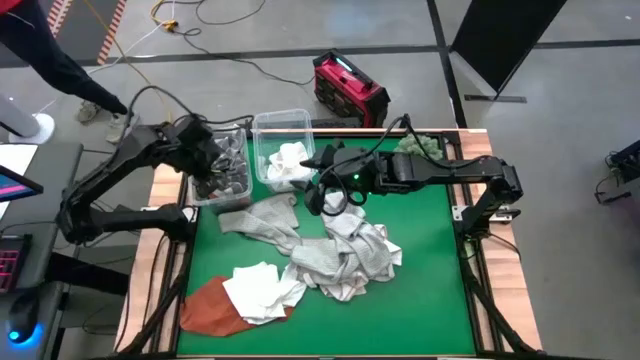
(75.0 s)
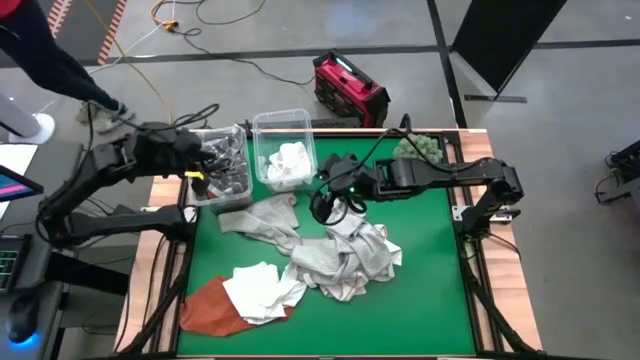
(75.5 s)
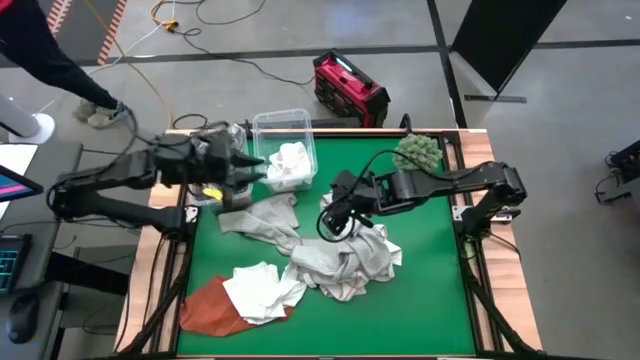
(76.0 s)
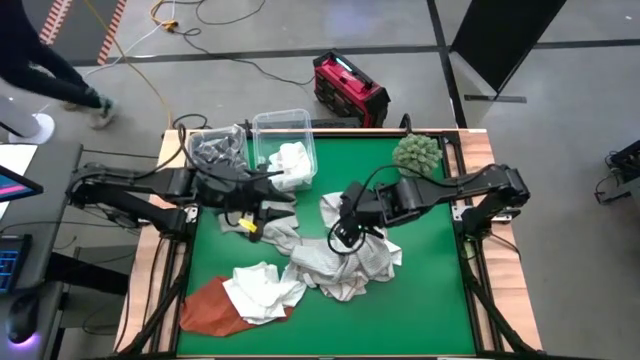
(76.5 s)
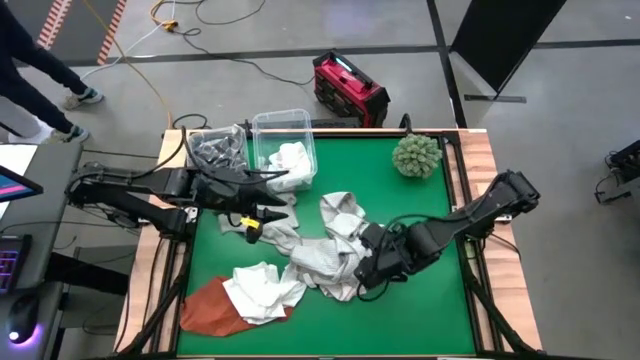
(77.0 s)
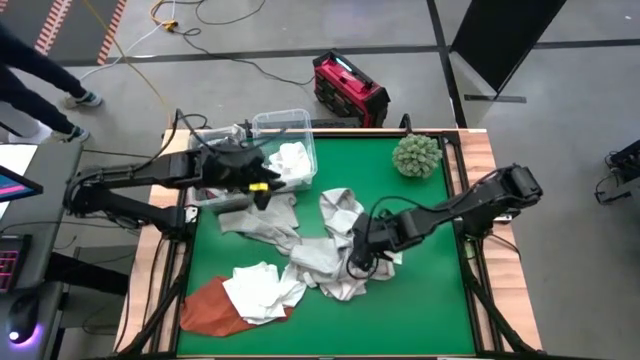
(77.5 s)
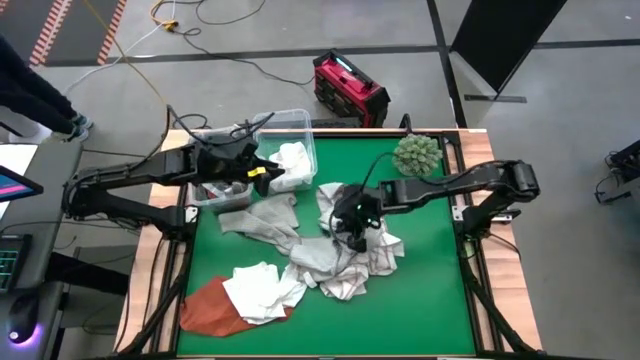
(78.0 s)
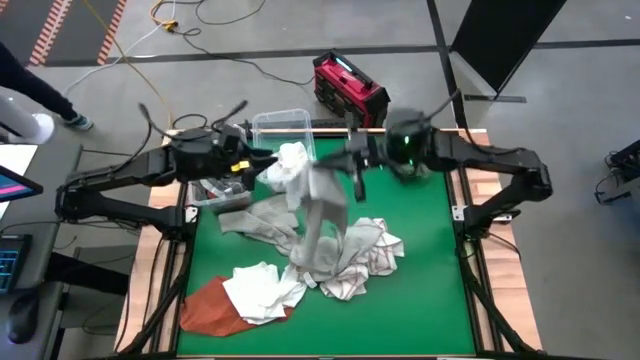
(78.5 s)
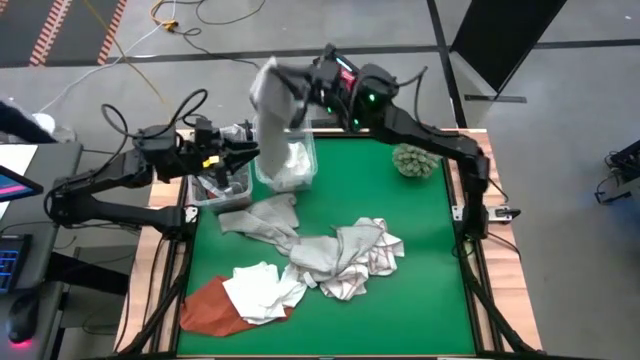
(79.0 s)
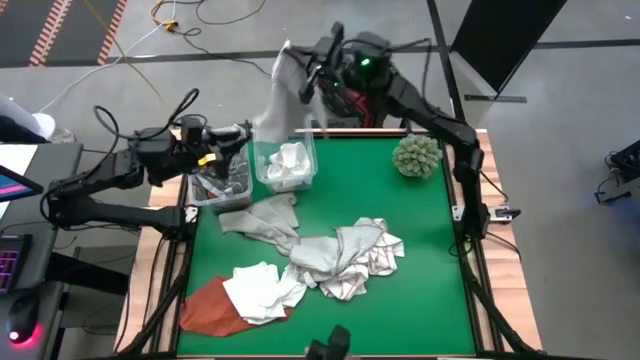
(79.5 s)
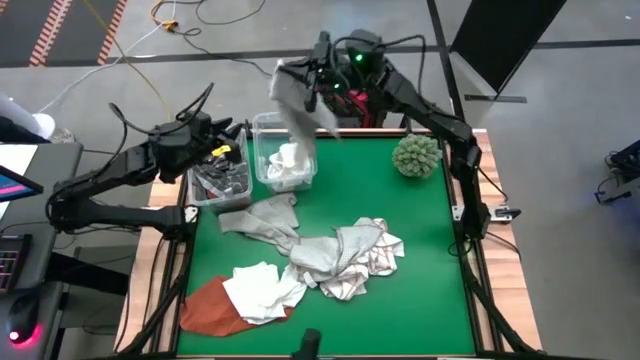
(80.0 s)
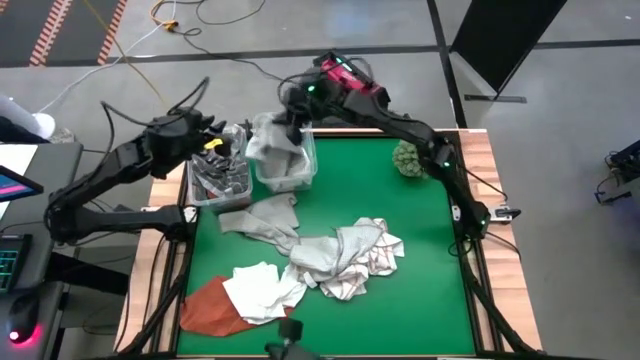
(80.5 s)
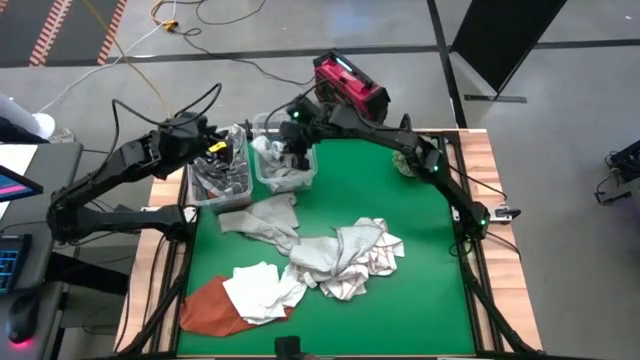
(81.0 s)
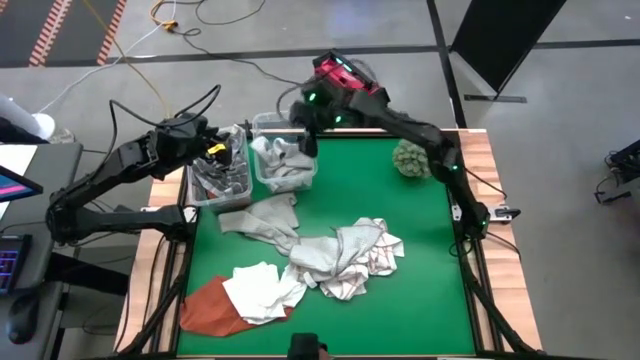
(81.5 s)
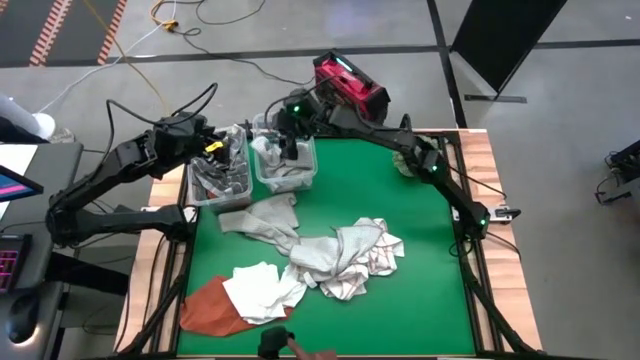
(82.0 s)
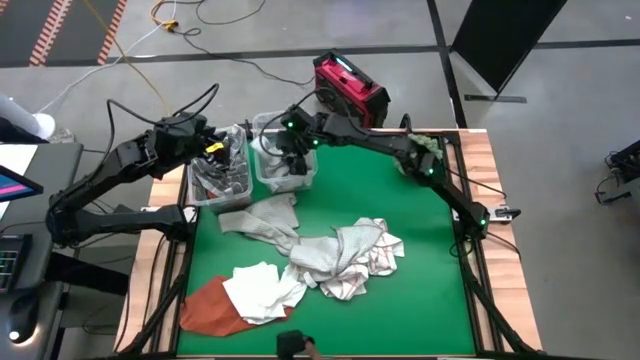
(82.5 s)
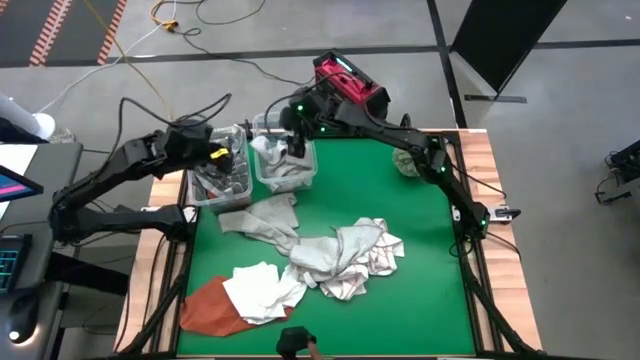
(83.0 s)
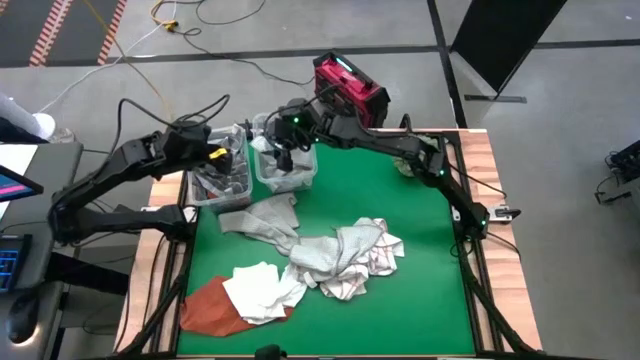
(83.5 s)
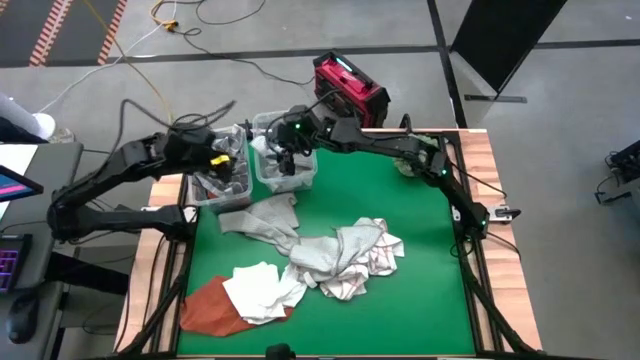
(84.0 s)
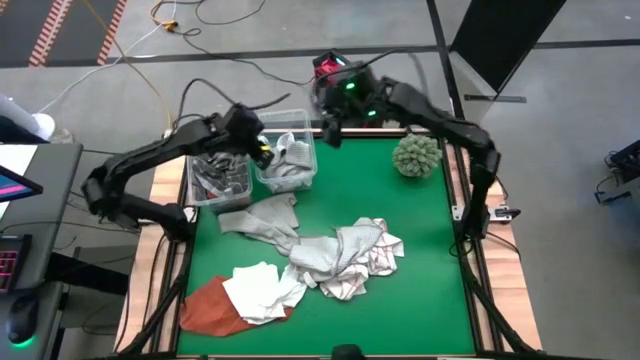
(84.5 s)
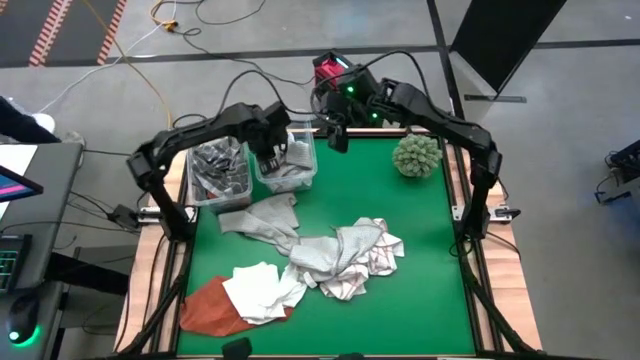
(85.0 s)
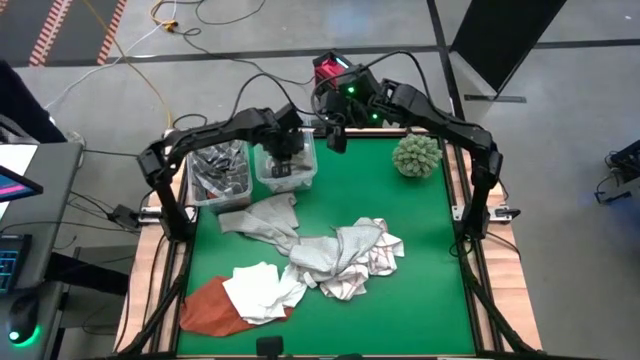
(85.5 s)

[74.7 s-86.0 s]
Task: Sort towels by color in basket
Put the light gray towel into the right transparent bin

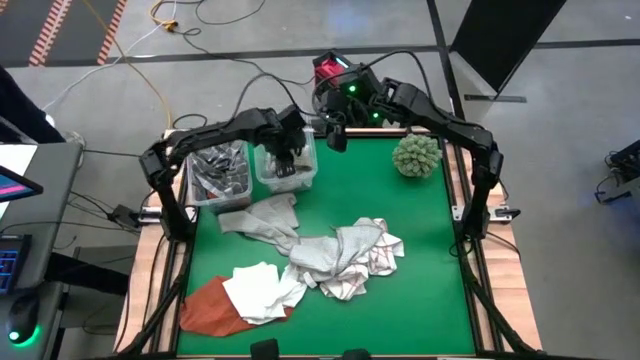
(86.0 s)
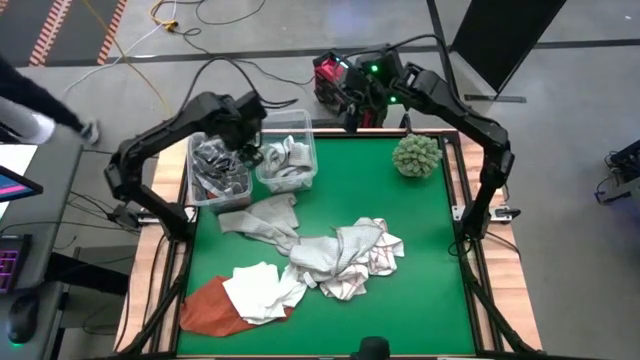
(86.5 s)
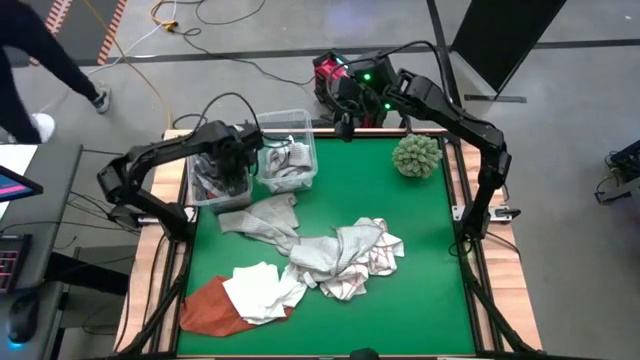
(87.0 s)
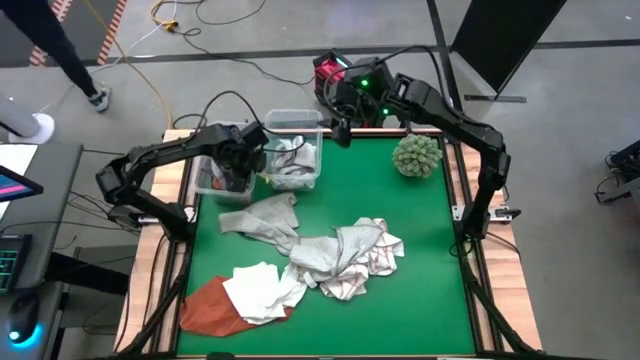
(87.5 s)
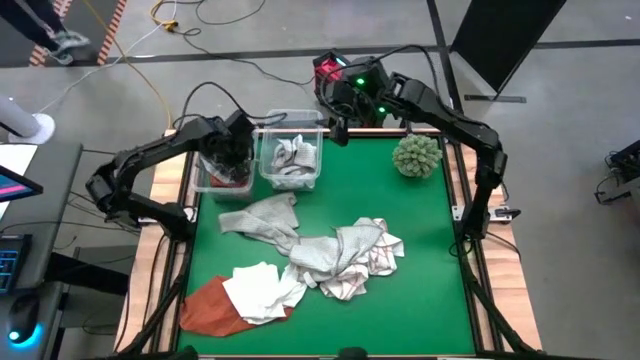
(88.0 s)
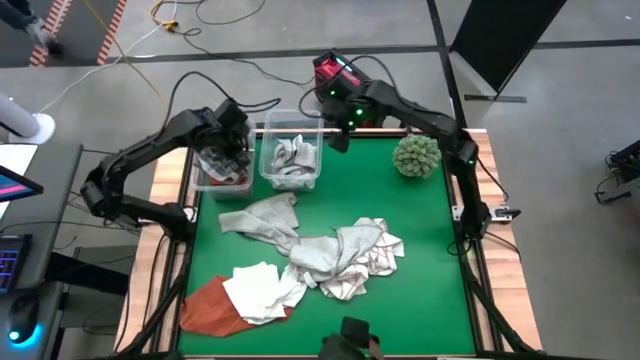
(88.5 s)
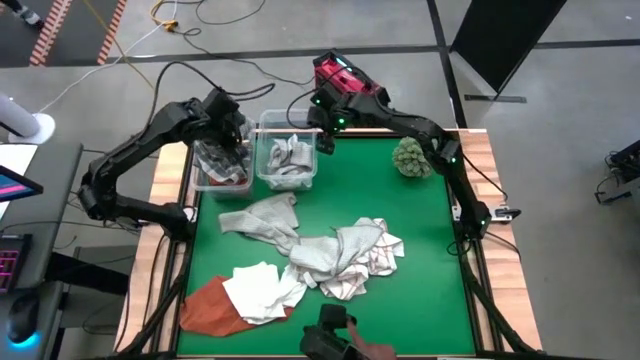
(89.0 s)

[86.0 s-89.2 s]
Adjust the gray patterned towel

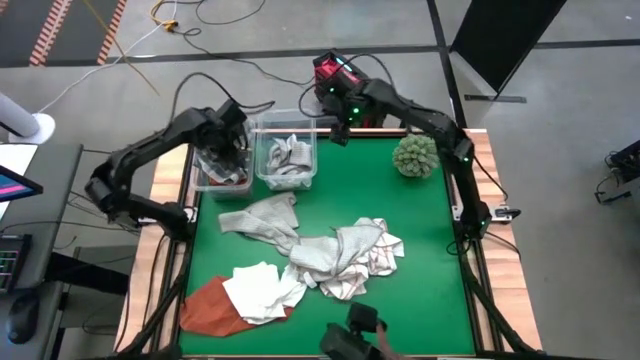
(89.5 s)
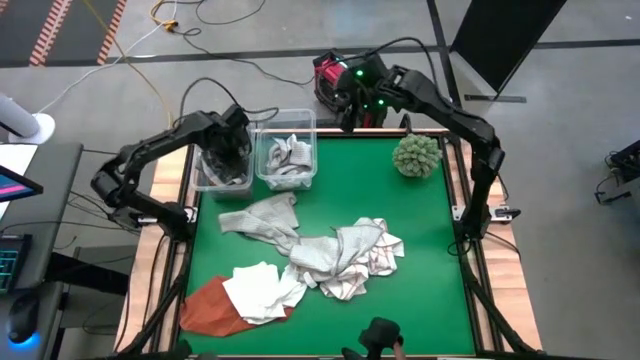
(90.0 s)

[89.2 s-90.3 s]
Adjust the transparent bin

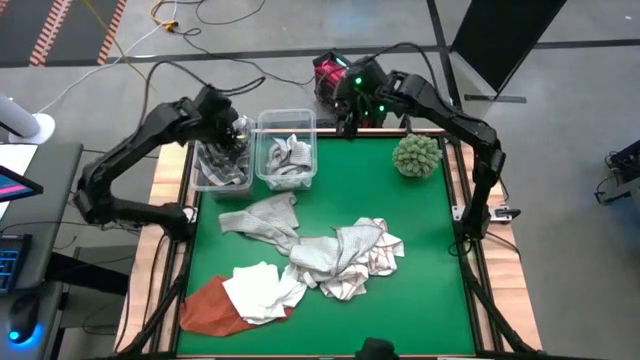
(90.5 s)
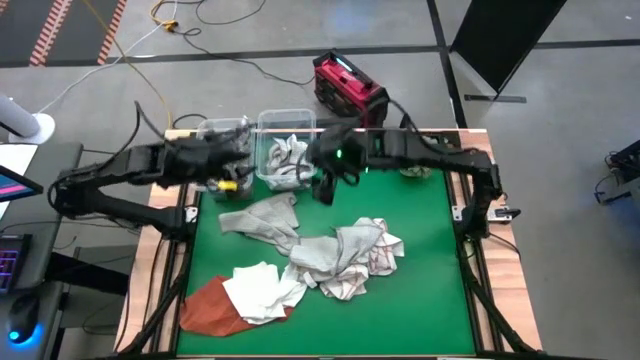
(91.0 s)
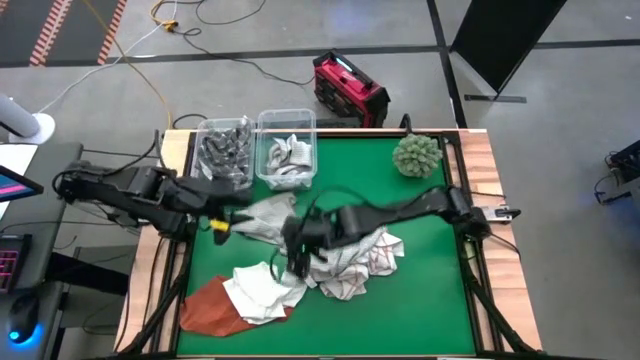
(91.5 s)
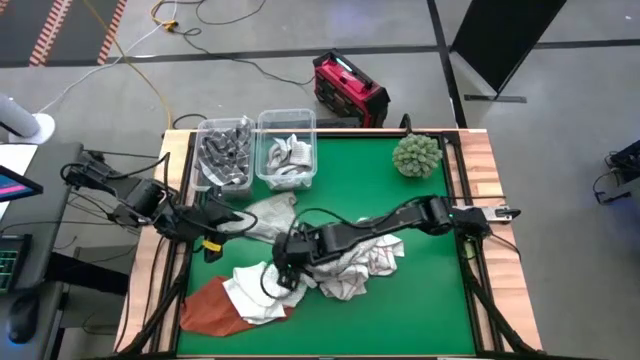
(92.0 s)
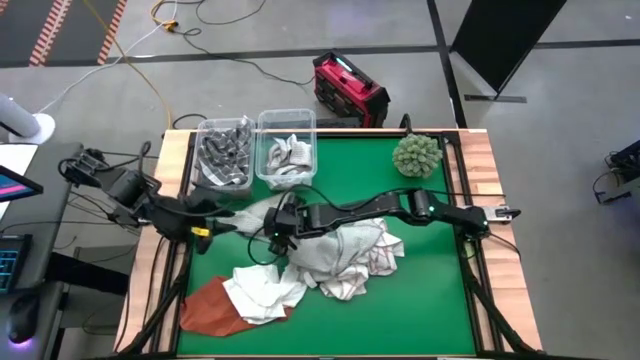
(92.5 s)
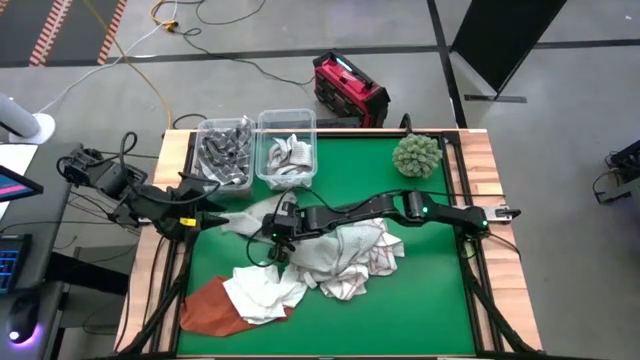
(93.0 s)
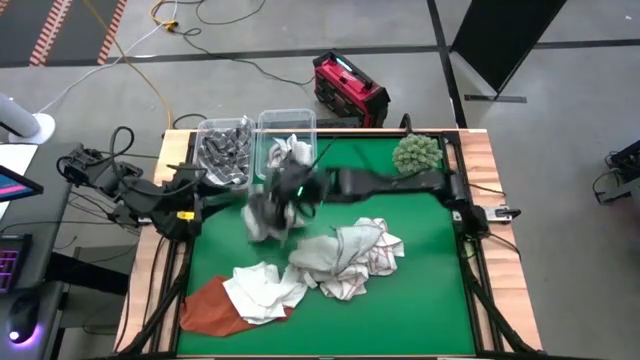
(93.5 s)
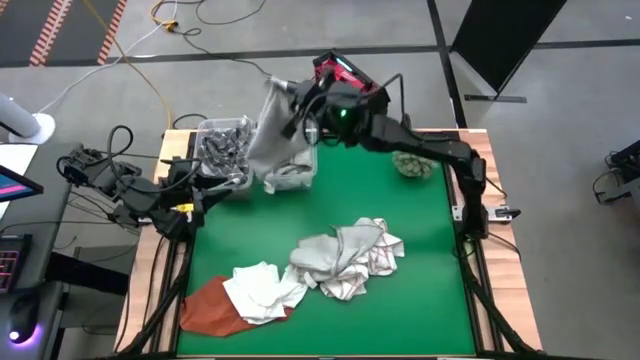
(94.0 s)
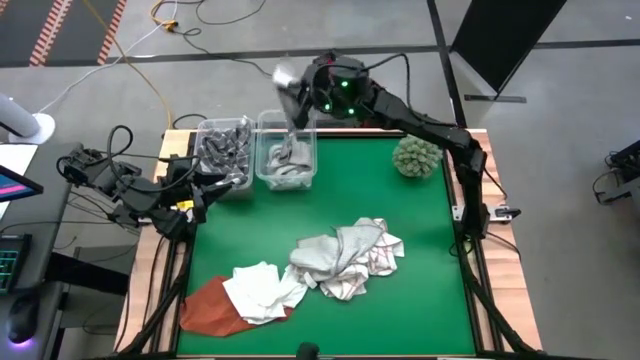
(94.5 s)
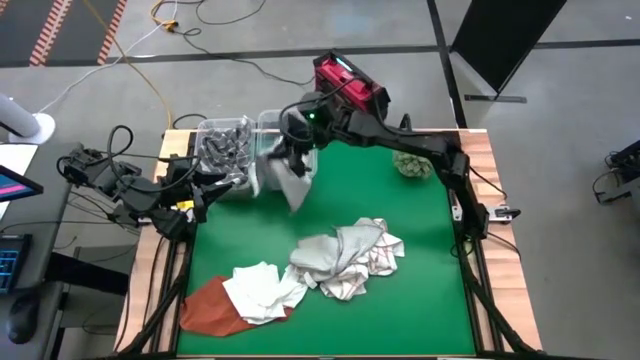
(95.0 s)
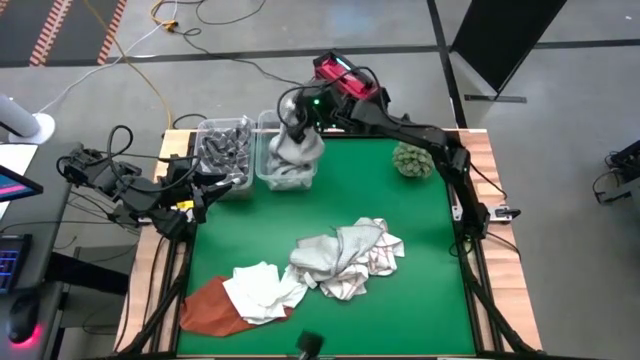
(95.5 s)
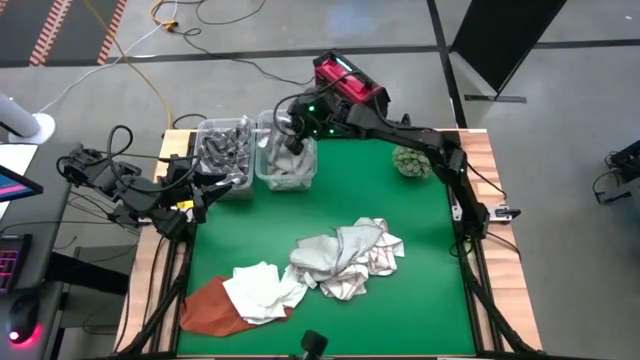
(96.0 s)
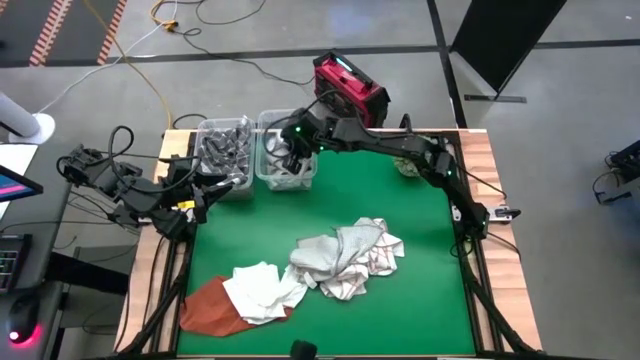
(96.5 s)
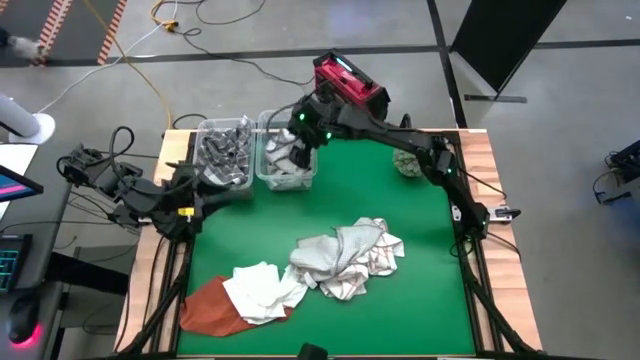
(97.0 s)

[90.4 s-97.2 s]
Put the light gray towel into the right transparent bin

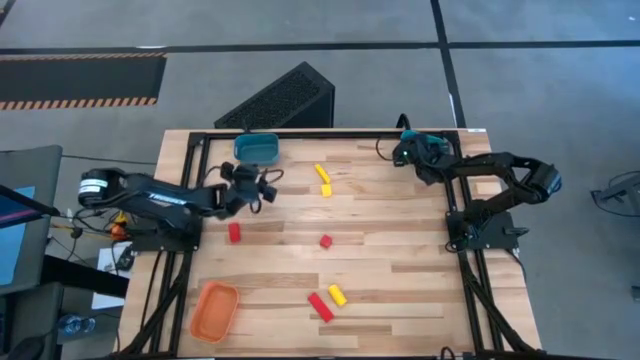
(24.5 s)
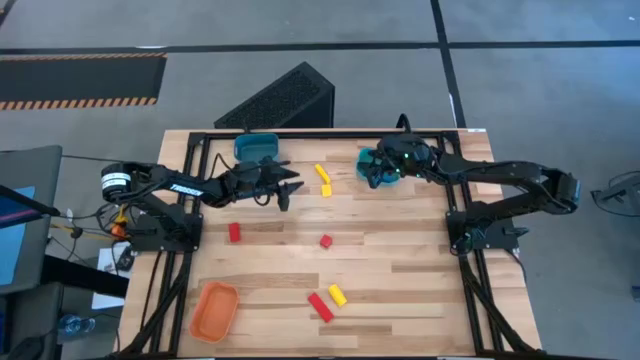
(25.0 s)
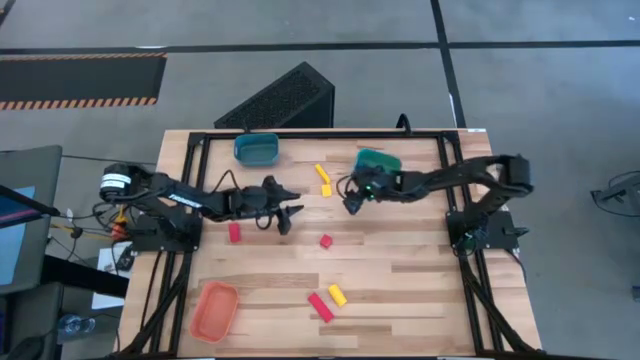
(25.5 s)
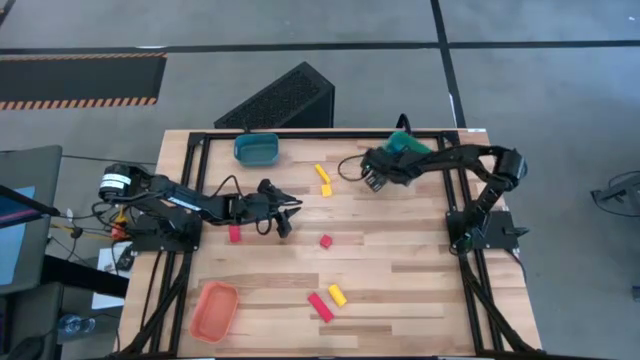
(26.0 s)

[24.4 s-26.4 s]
Task: Sort & place blocks by color
Adjust the green bin
